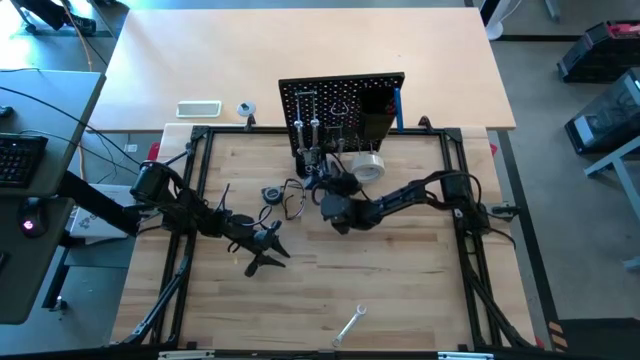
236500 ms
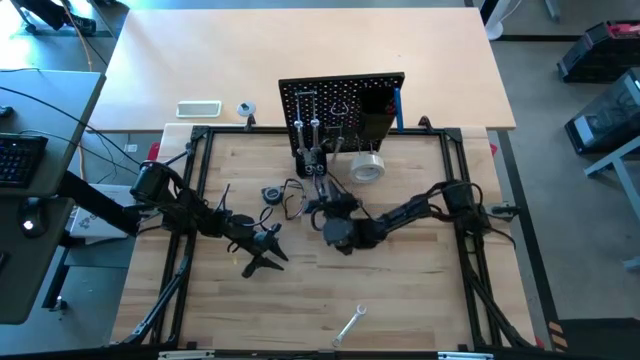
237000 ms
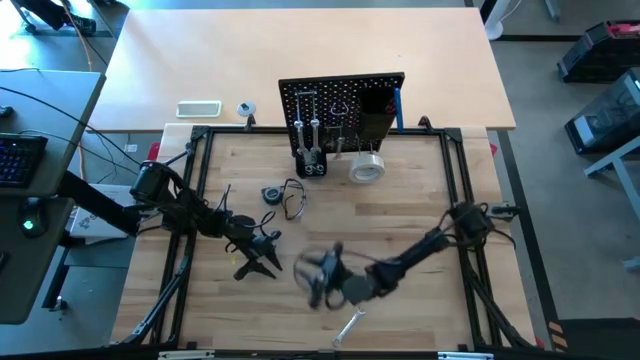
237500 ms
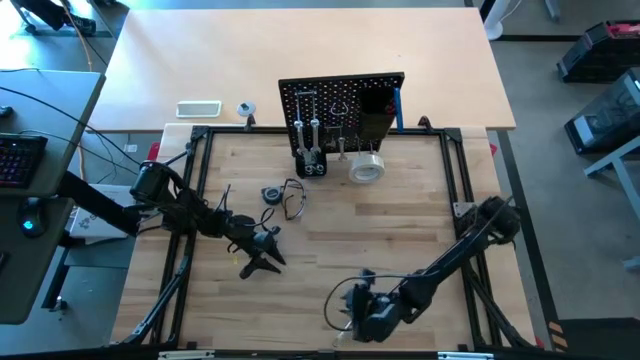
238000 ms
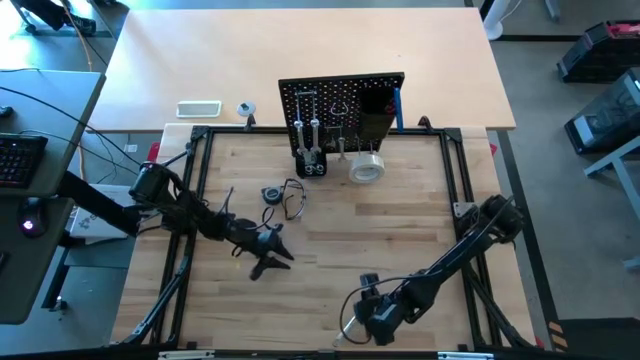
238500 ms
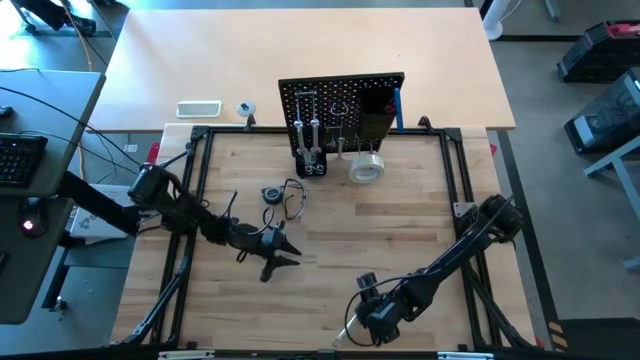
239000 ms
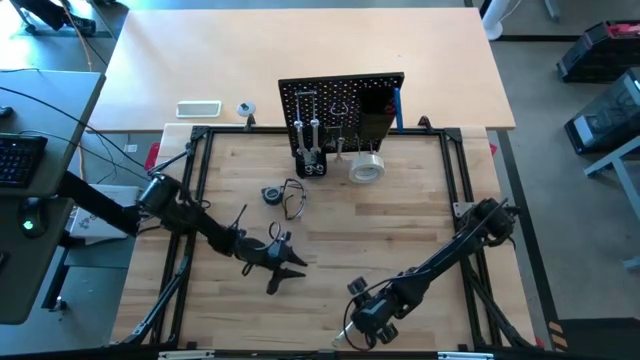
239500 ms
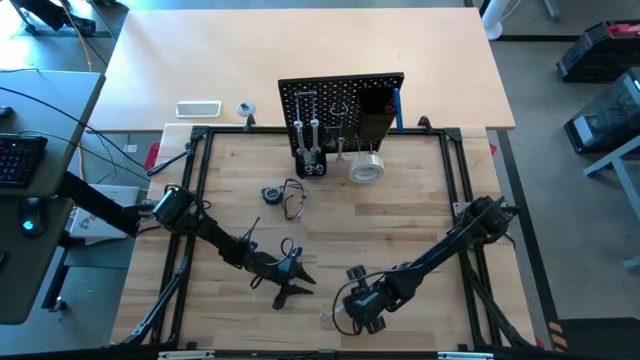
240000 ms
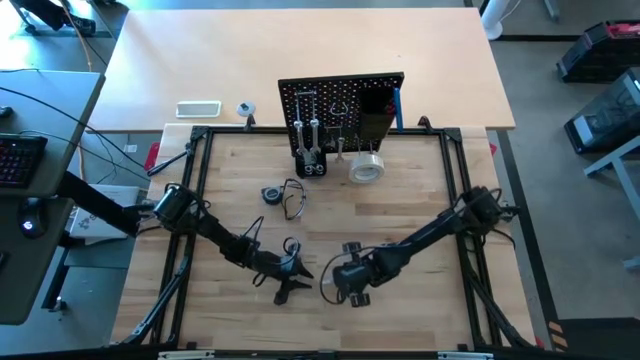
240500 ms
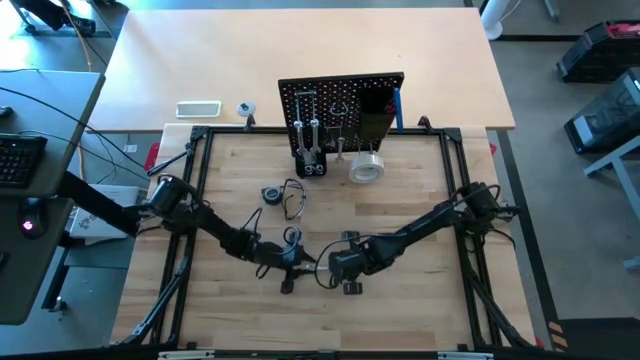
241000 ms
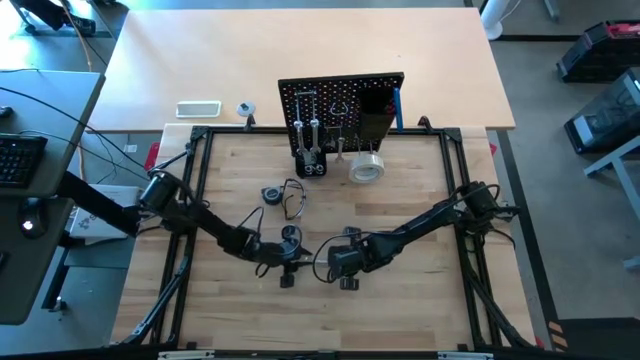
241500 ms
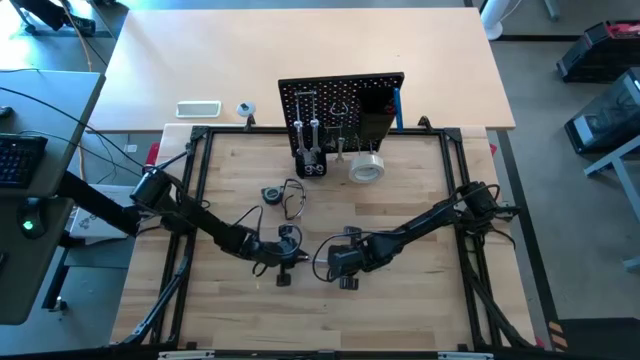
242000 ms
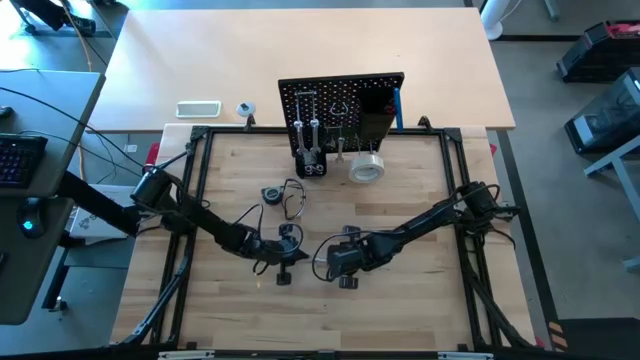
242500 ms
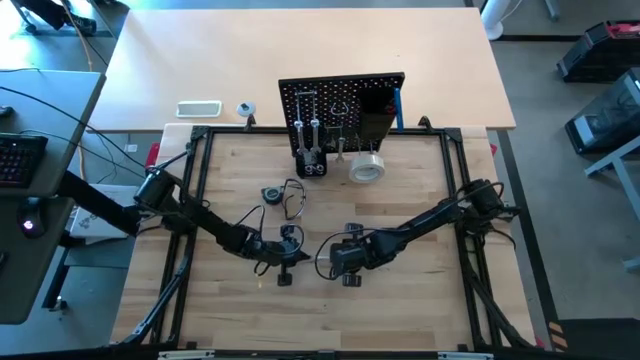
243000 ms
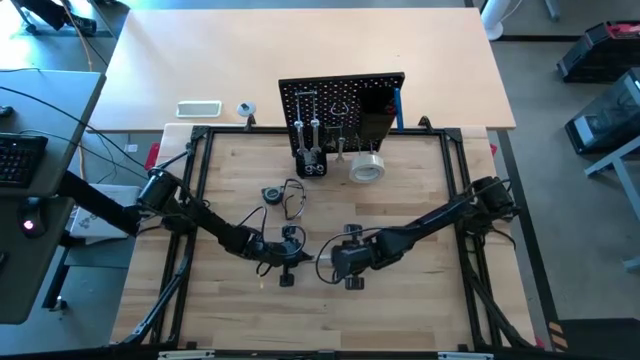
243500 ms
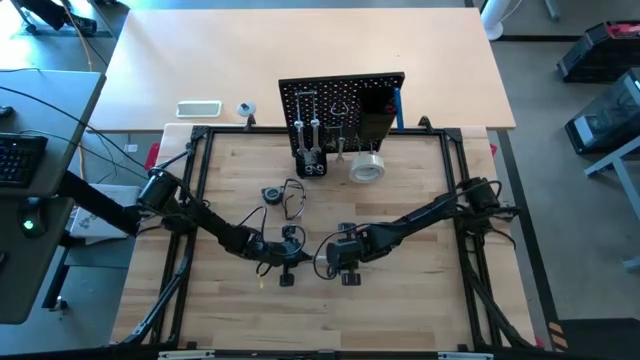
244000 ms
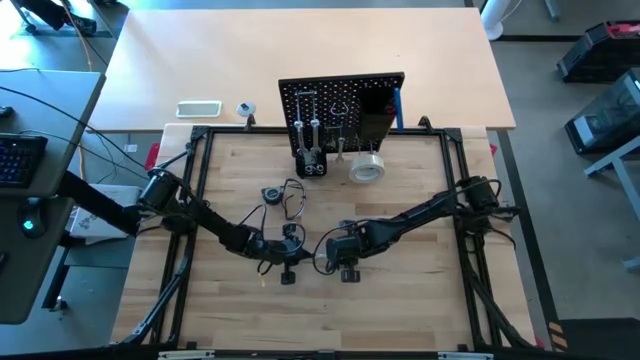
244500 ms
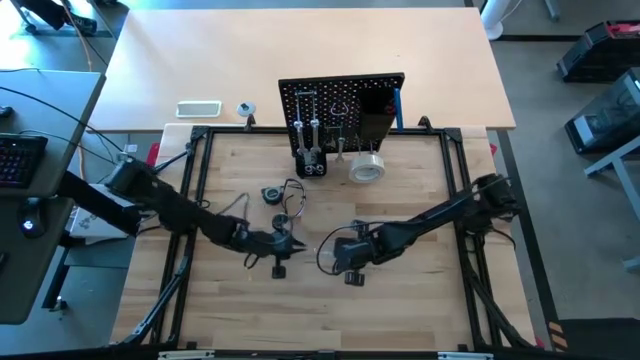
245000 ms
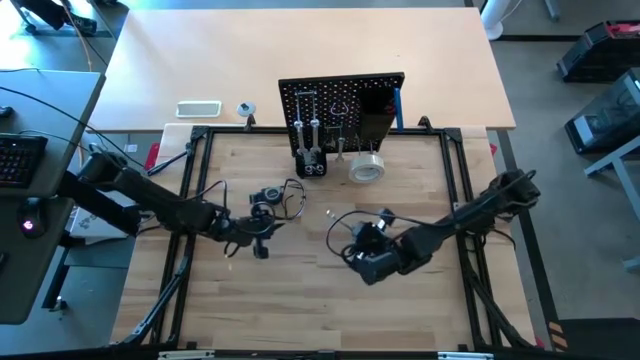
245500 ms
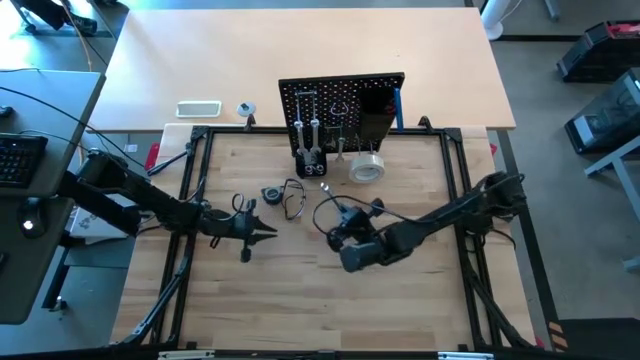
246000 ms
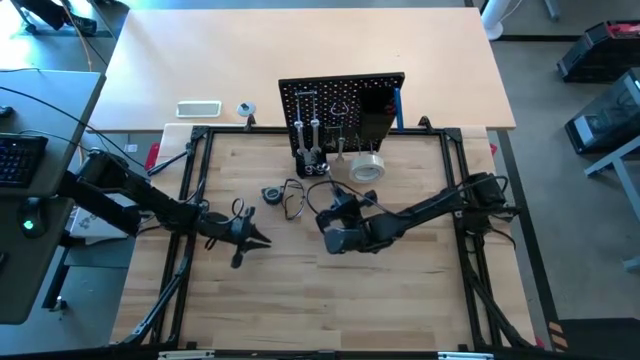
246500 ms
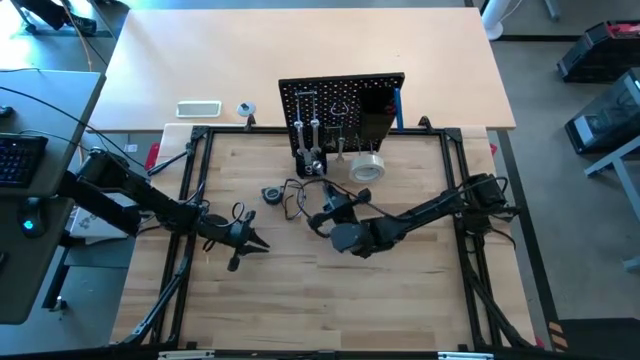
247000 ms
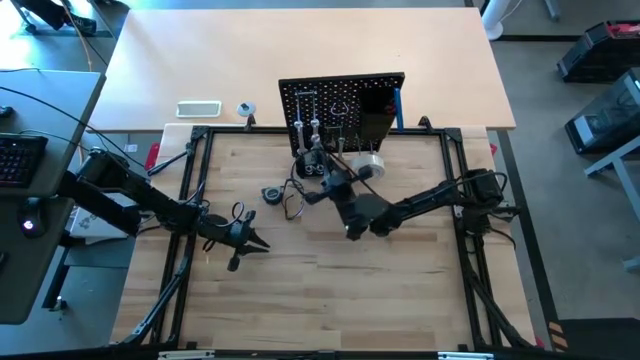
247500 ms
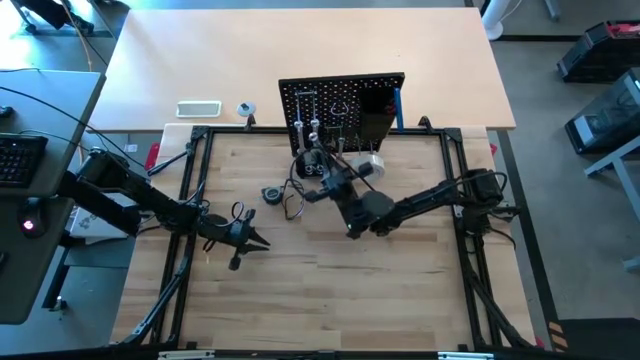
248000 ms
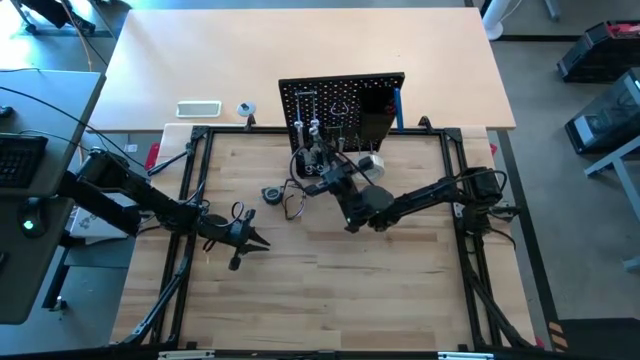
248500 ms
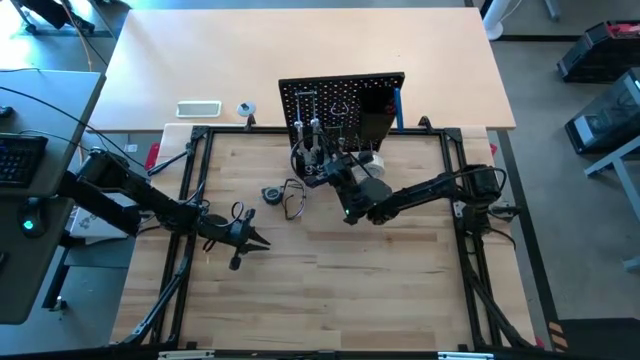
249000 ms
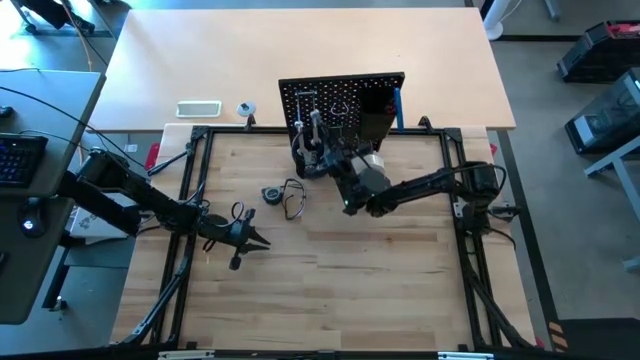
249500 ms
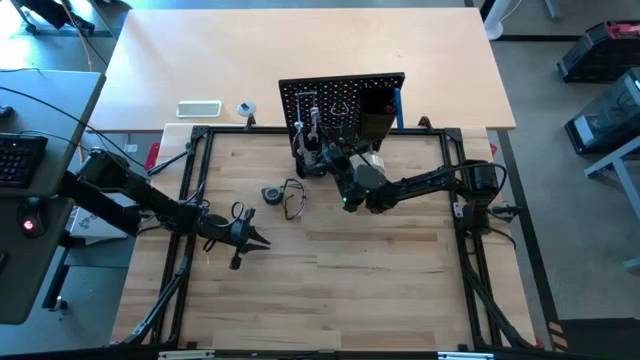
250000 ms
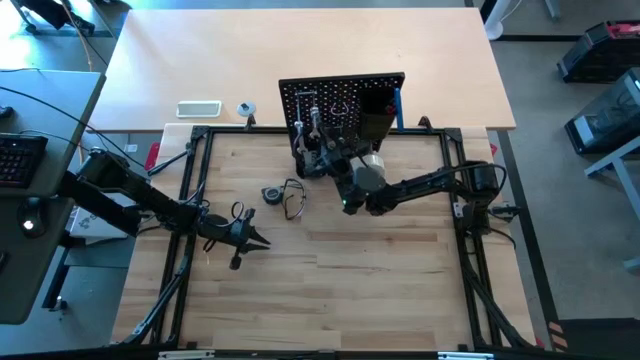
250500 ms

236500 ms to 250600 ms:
Task: Hang tools onto peg board
Hang the wrench on the pegboard

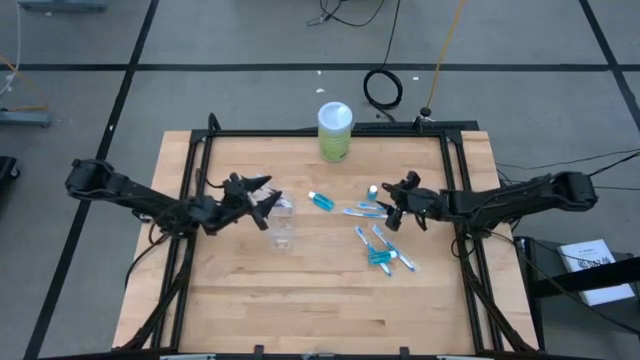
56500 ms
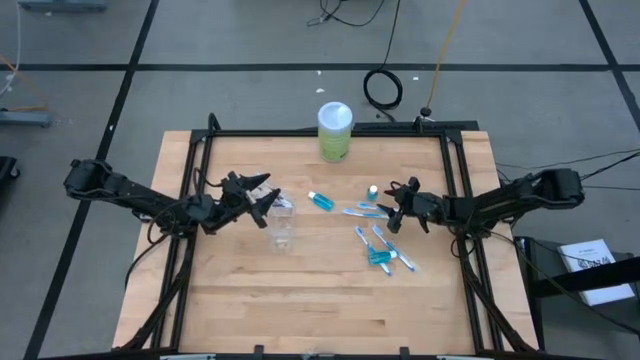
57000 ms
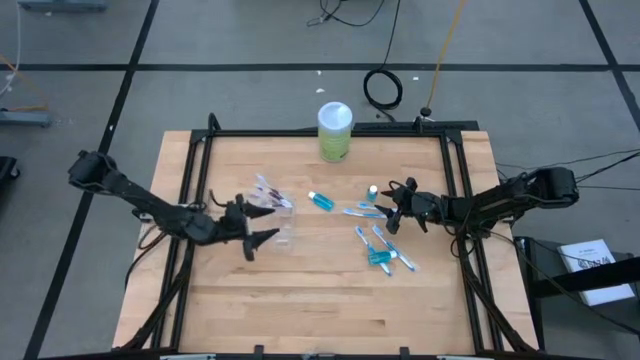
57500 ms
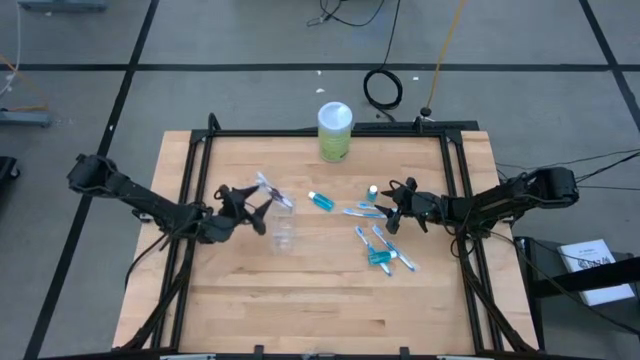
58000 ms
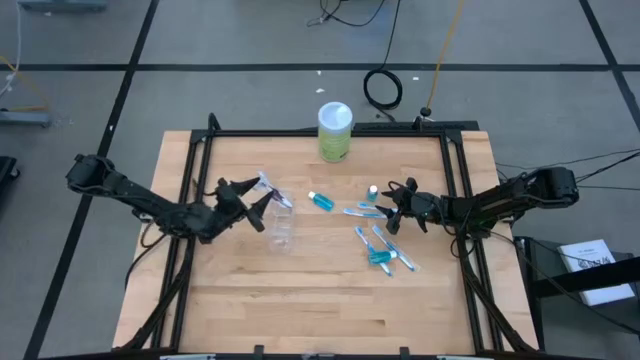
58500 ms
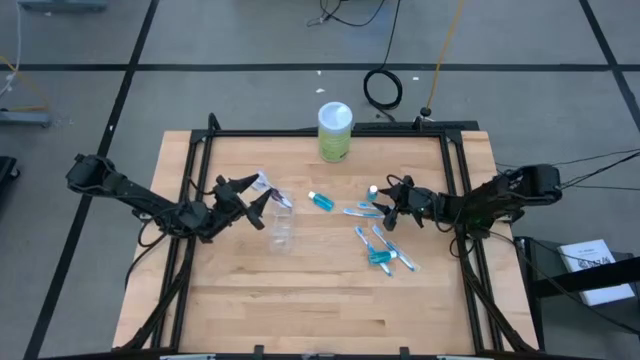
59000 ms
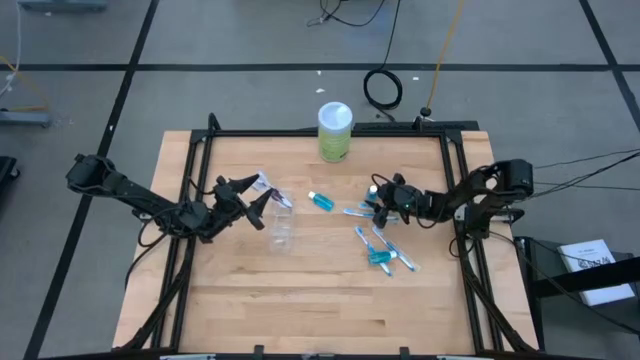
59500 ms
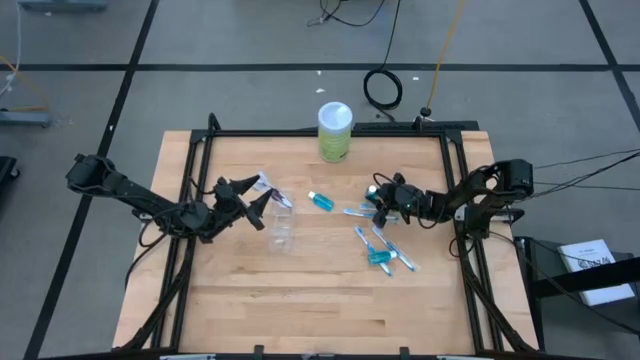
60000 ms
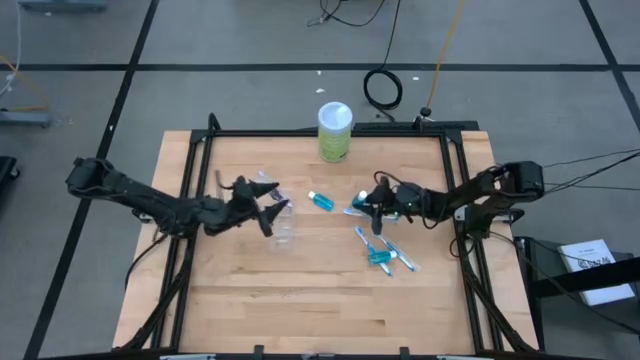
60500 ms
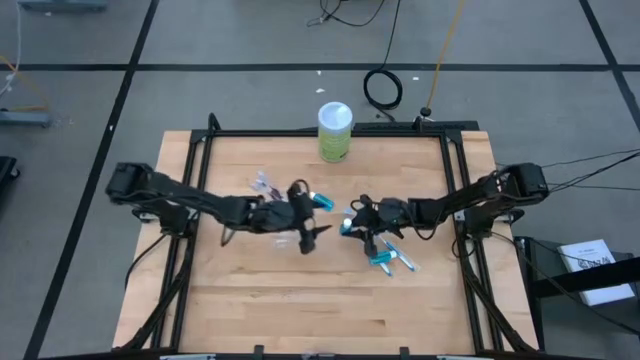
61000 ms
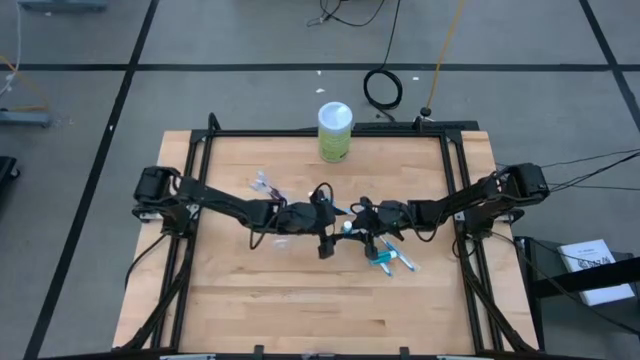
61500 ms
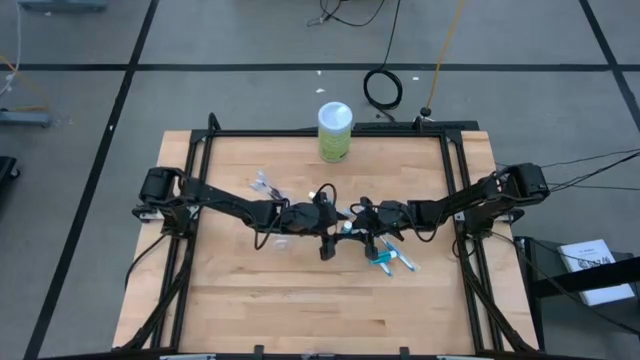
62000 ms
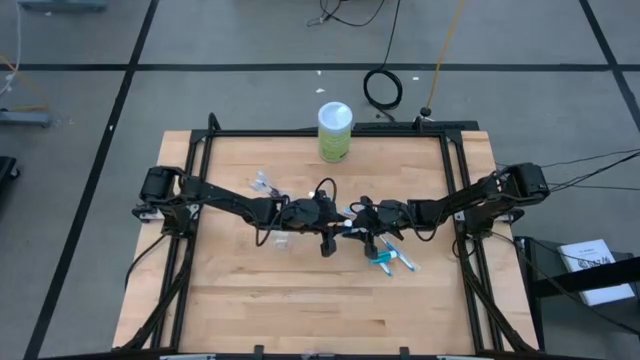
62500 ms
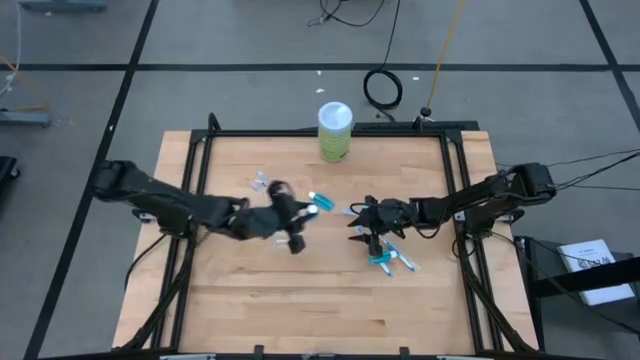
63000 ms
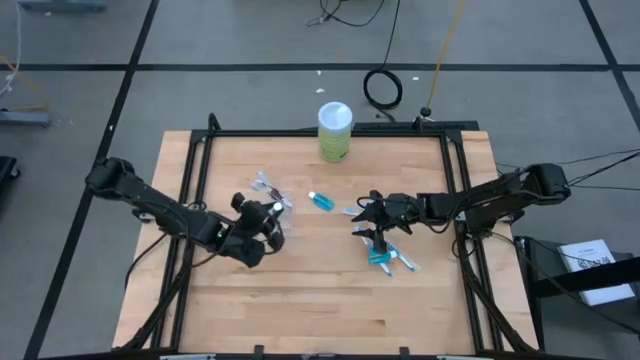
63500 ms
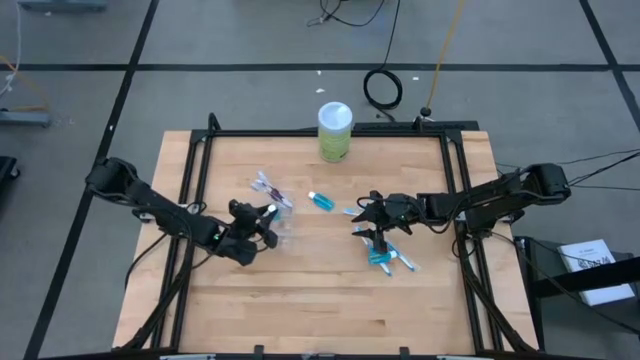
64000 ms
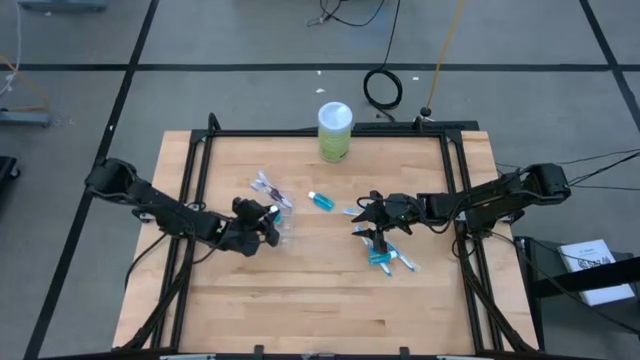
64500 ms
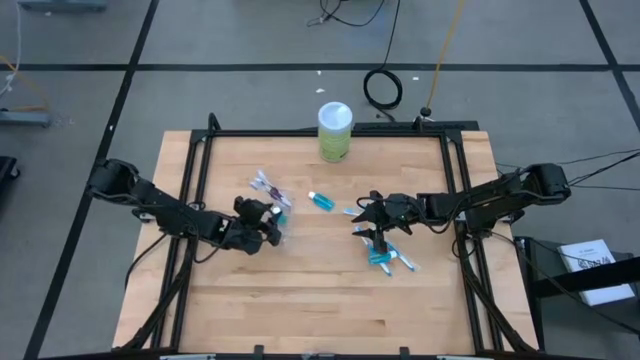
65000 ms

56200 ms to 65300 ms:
Task: Pick & Place toothbrushing station
Put the top right blue mouthwash into the transparent organizer
